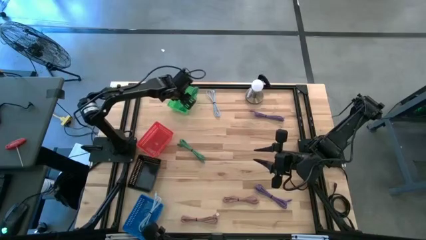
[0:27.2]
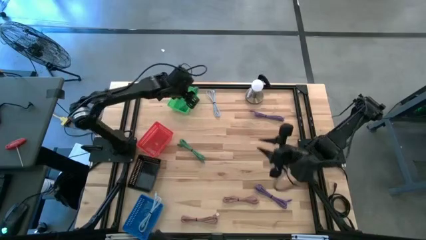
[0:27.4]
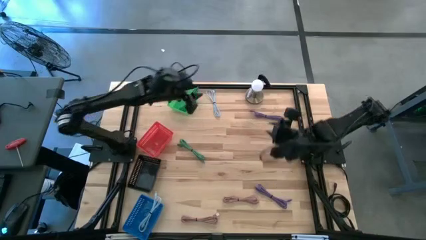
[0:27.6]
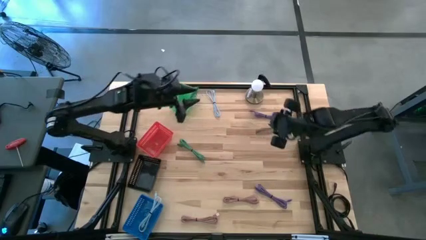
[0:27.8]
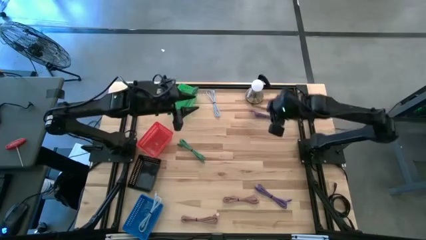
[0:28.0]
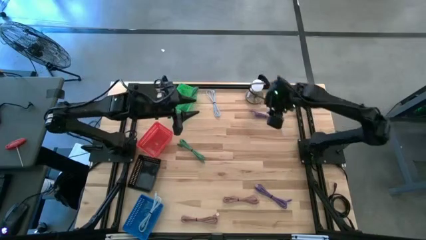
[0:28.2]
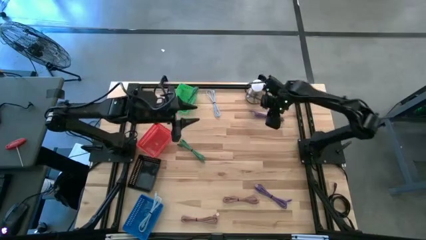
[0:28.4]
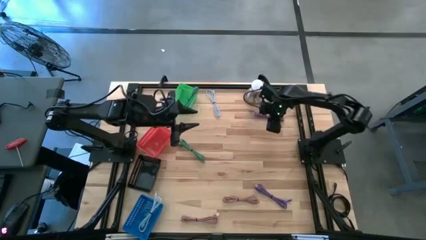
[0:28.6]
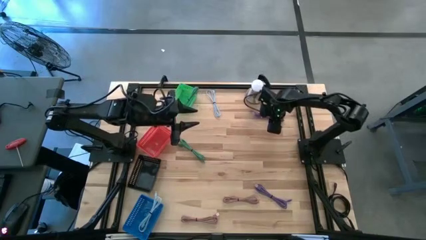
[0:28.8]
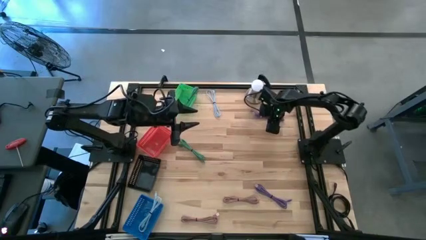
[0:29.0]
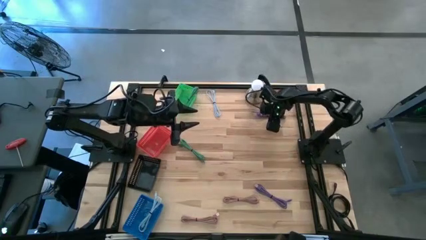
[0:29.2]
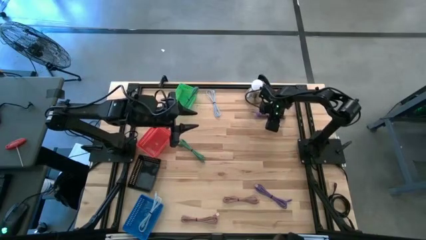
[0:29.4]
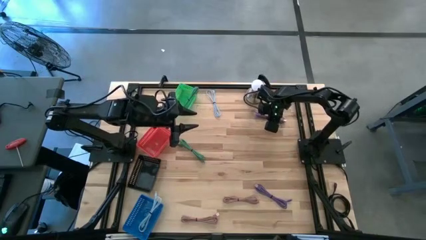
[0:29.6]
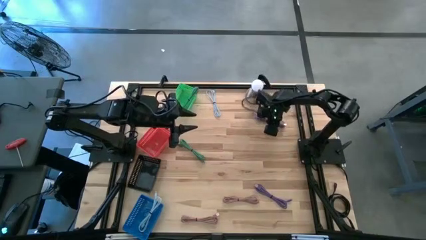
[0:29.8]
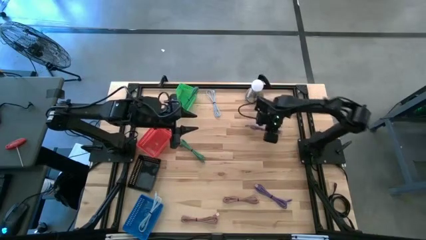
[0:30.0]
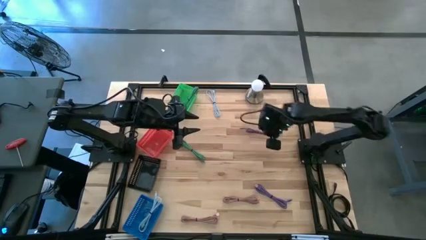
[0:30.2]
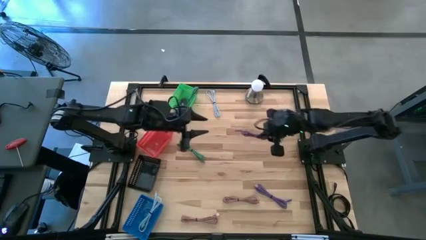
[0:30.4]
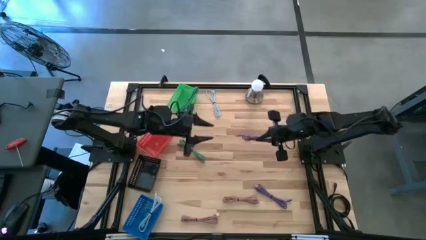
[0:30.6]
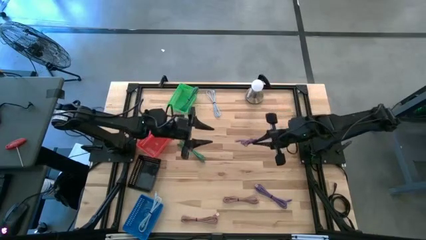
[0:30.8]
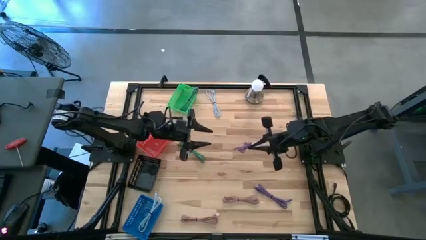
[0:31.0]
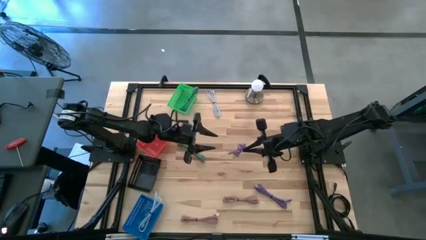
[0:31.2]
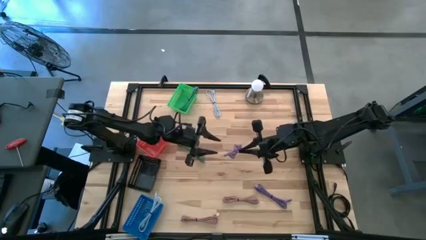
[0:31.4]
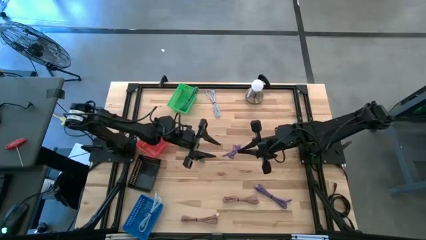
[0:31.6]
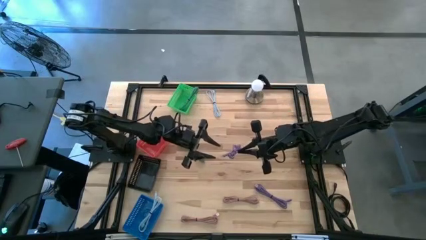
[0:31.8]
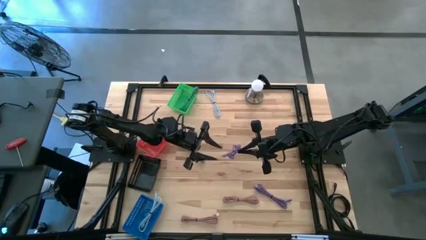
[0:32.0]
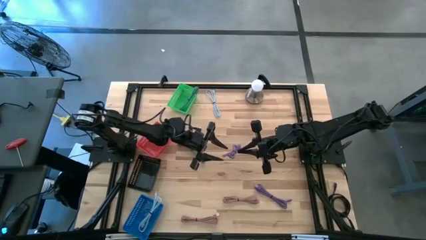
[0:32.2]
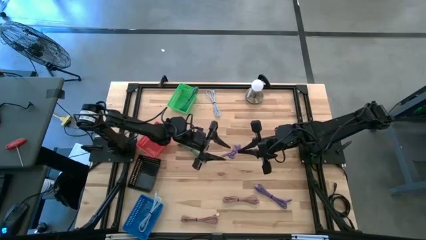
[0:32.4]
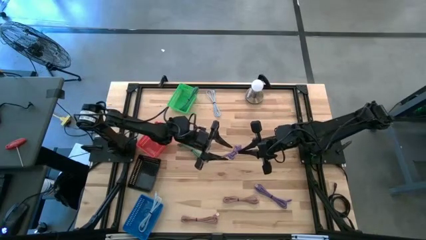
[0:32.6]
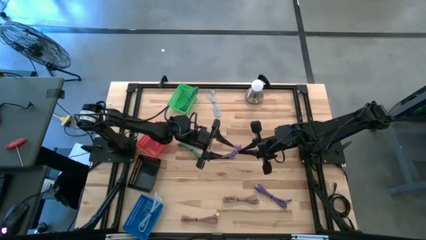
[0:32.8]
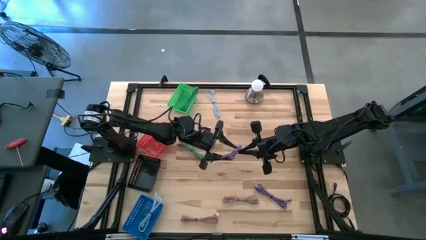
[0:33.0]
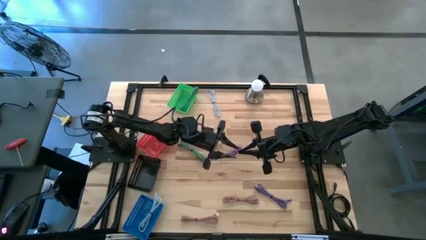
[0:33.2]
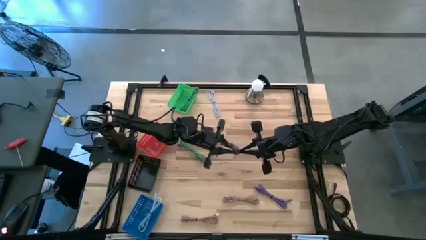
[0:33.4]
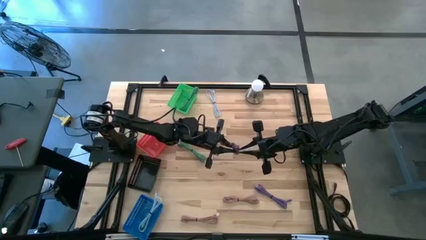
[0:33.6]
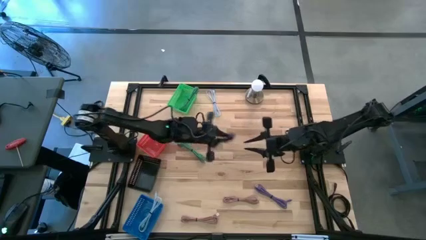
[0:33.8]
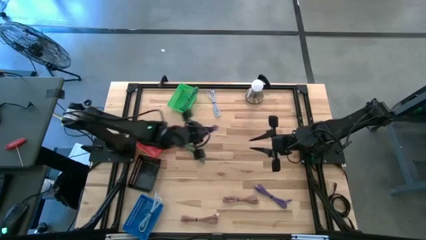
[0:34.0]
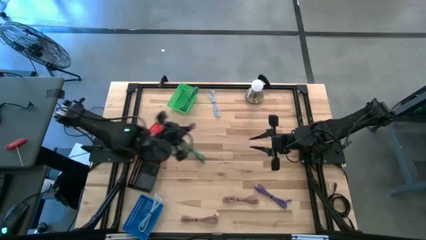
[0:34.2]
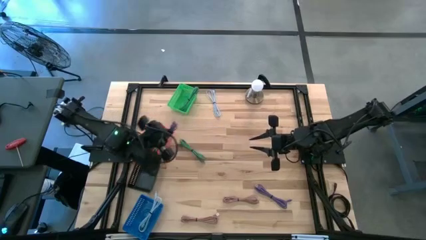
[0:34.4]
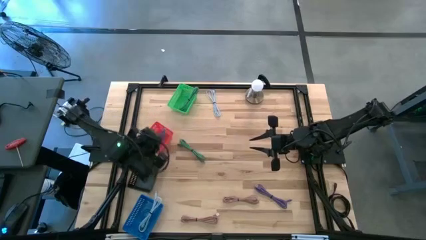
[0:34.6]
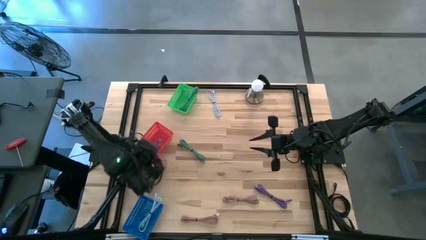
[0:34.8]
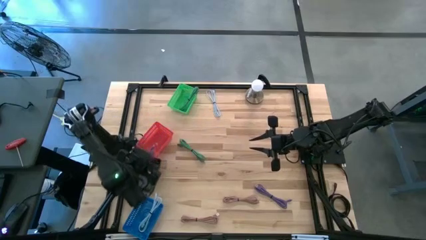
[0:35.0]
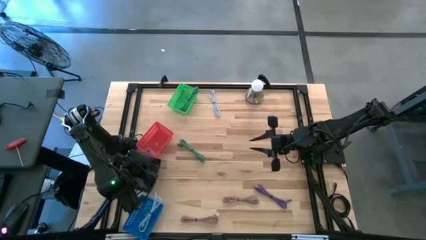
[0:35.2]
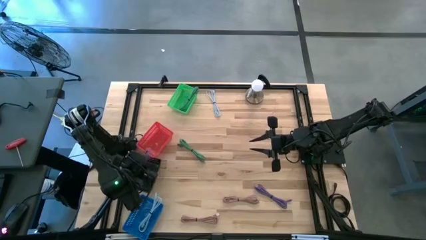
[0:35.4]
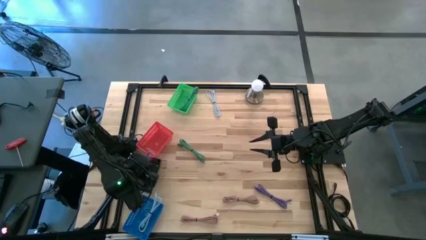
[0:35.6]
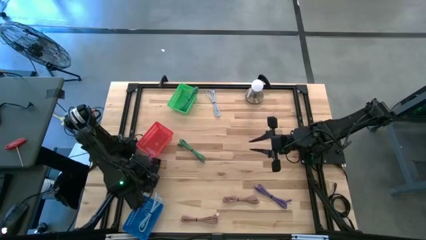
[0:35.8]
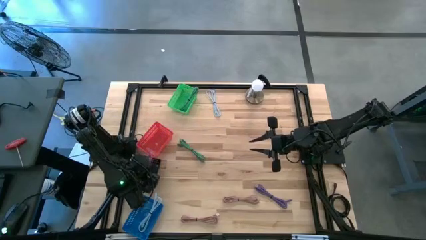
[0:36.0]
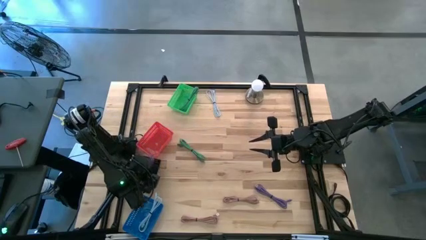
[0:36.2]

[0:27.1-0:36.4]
Task: Pick & Place USB Port
Put the top purple charger cable into the black bin

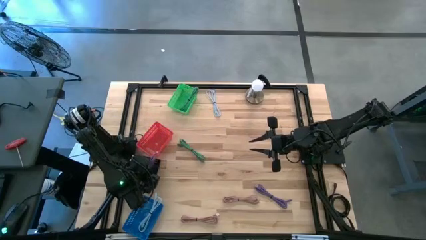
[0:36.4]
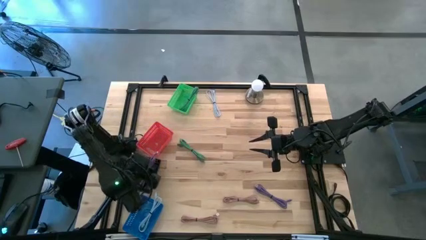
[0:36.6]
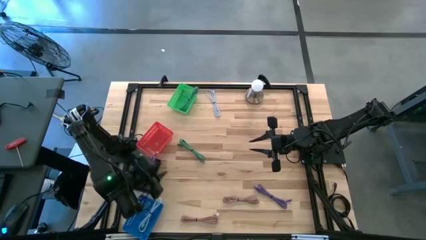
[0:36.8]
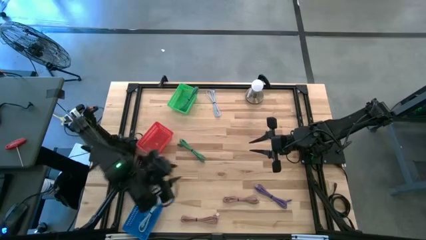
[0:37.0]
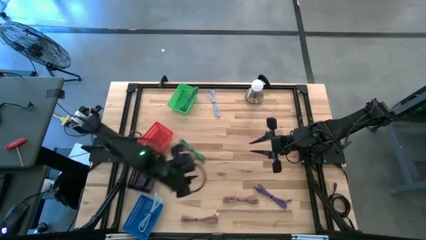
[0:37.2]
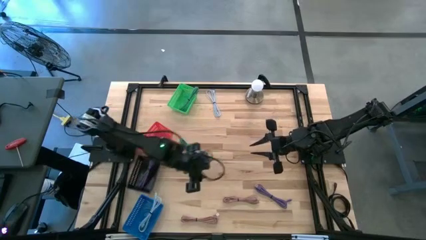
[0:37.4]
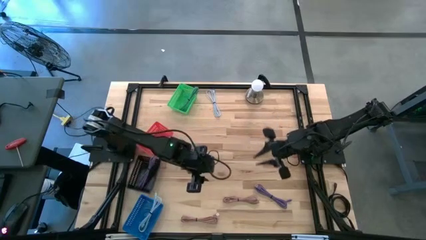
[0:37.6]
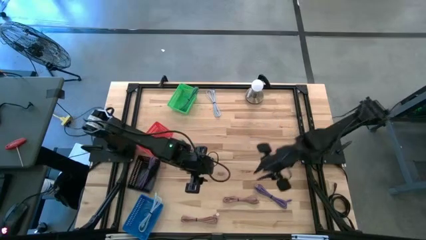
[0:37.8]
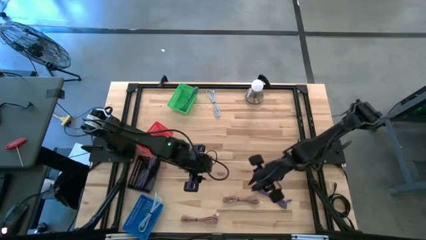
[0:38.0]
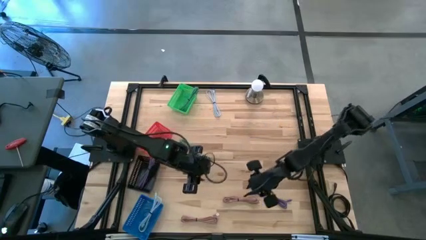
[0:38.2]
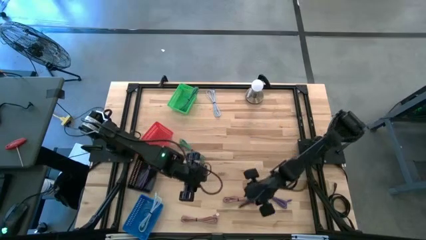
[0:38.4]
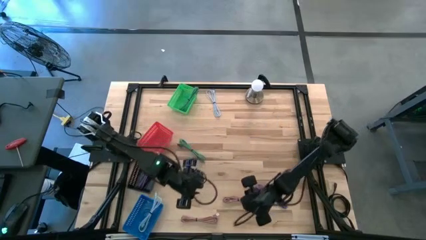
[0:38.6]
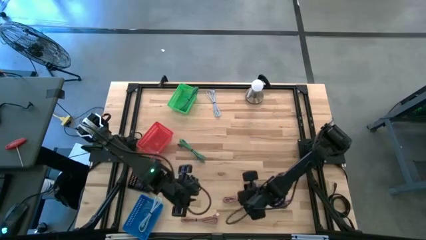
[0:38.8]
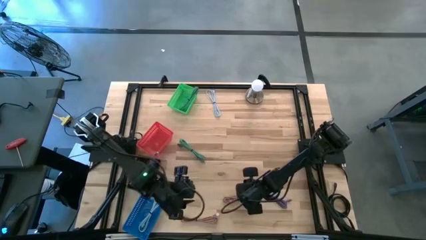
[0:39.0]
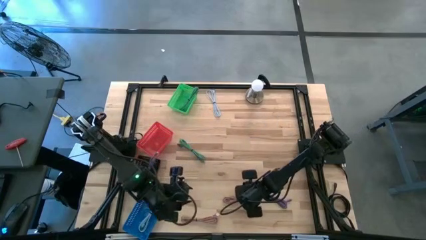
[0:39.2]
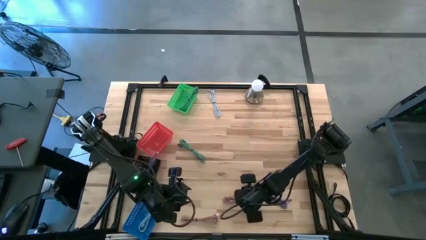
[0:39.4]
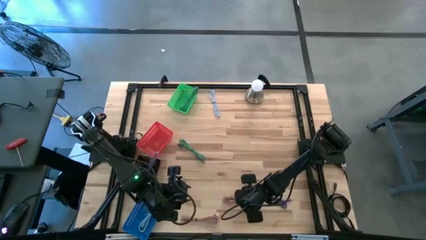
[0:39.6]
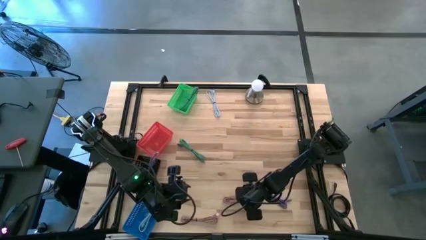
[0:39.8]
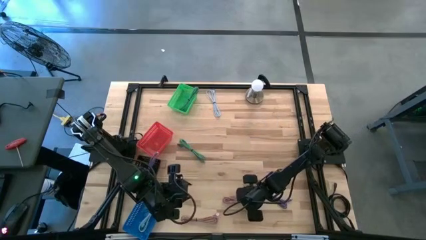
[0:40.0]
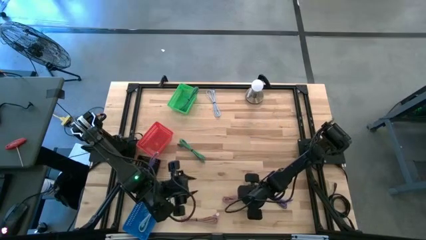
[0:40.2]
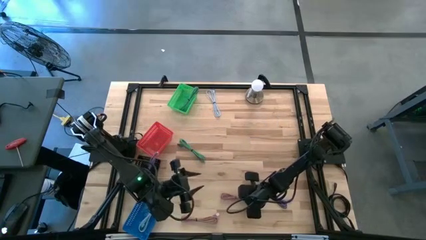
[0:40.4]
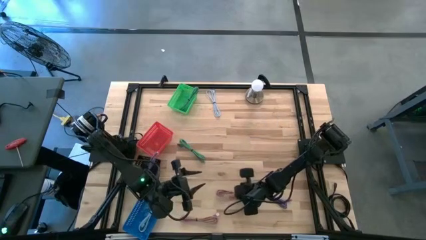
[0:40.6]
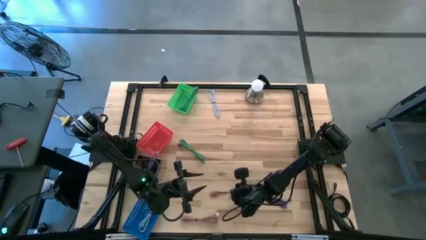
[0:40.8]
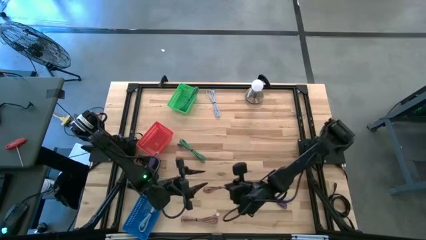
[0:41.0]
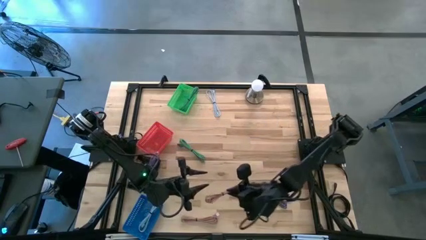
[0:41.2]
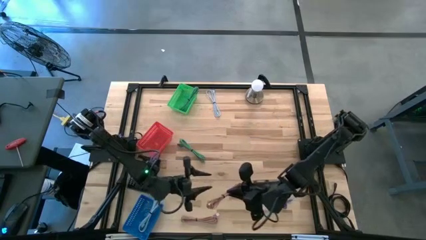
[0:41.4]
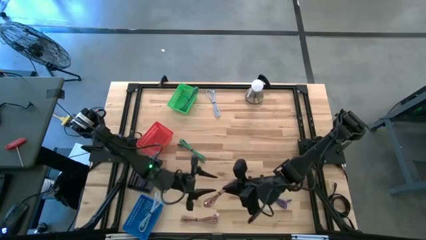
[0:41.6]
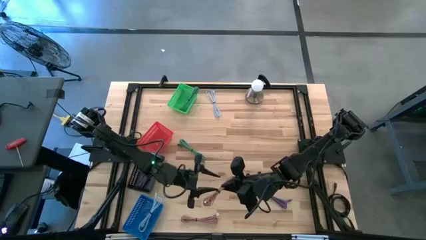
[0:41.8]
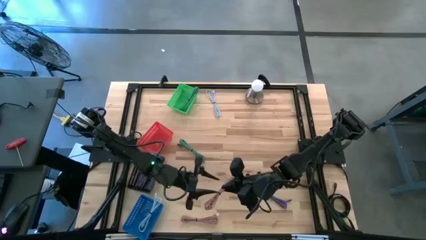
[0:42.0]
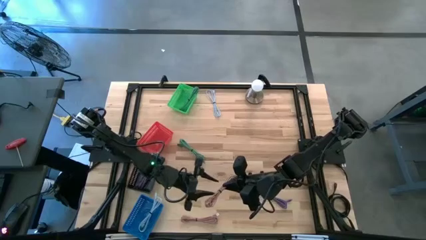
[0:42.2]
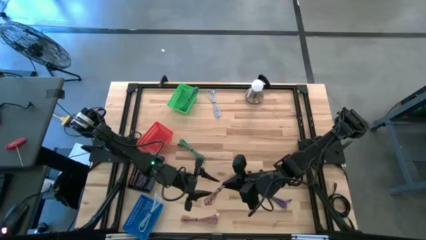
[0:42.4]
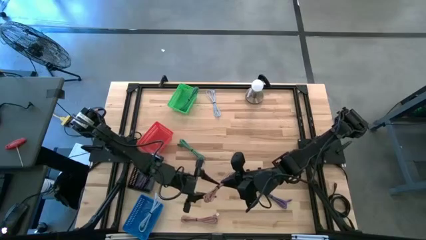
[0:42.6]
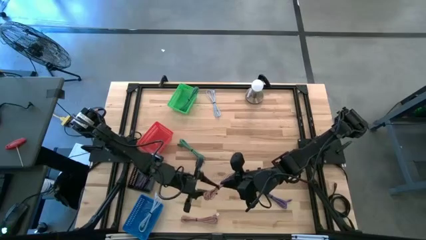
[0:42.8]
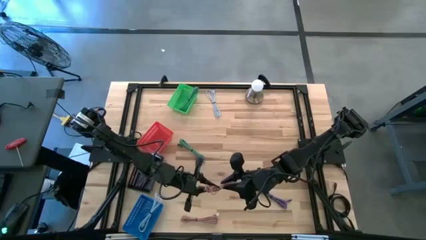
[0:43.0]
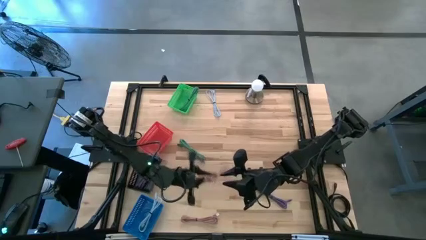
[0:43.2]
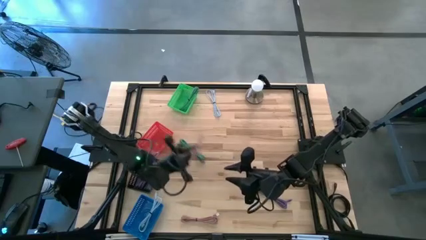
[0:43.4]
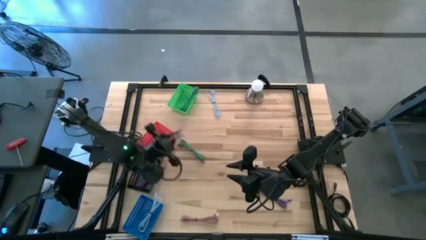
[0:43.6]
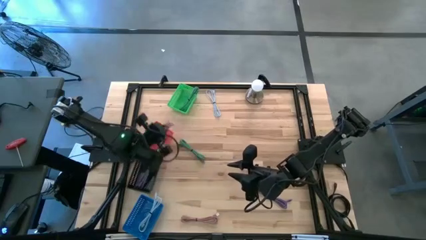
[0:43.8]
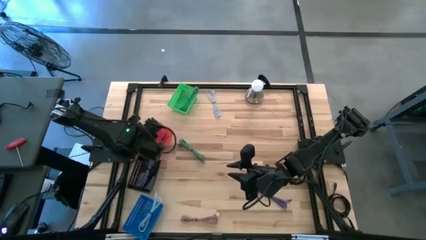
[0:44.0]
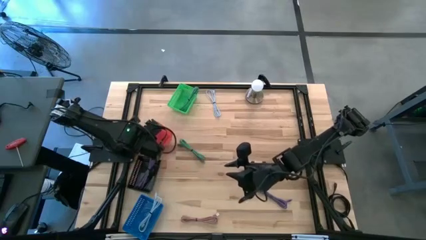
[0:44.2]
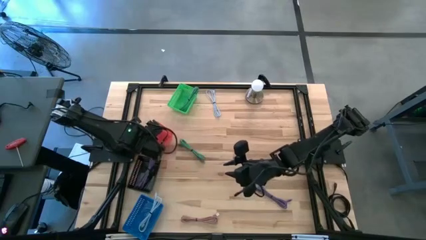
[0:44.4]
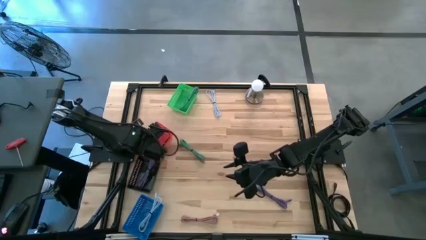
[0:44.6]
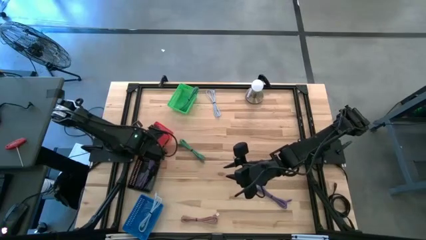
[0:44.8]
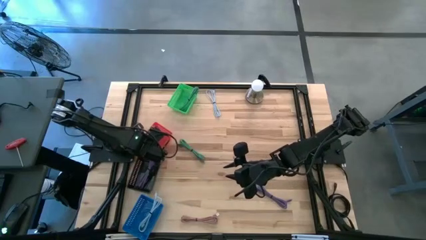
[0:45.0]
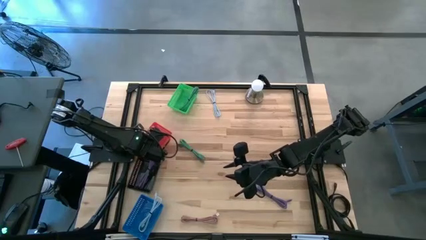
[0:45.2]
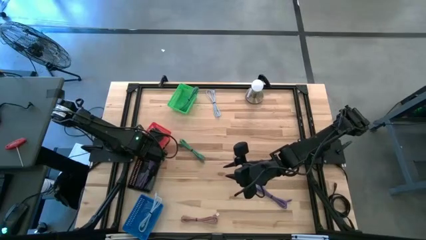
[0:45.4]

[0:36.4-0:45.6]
Put the right pink charger cable into the red bin
